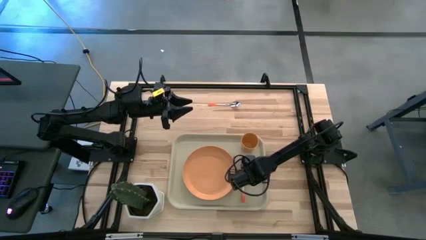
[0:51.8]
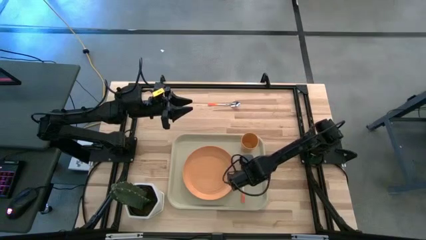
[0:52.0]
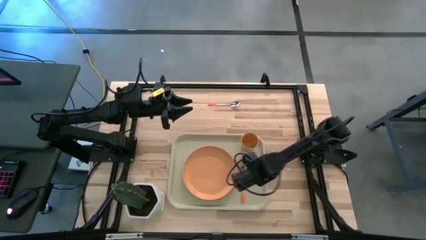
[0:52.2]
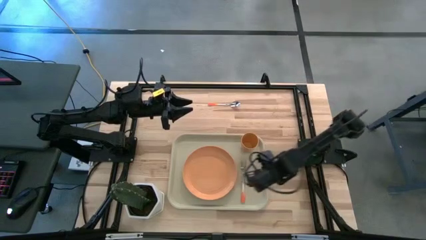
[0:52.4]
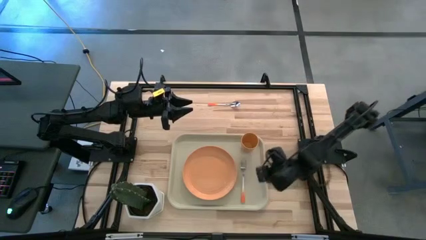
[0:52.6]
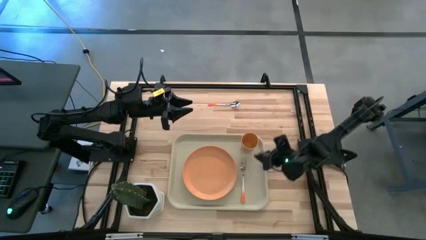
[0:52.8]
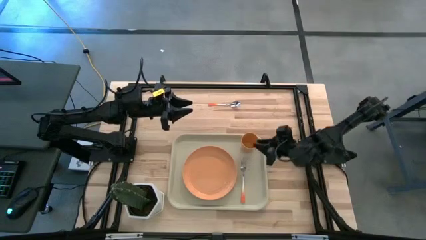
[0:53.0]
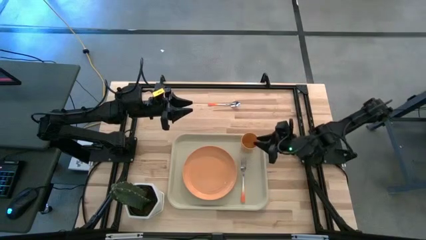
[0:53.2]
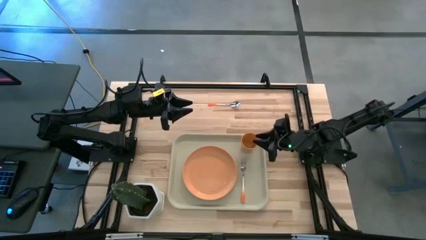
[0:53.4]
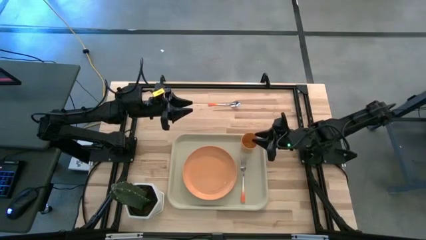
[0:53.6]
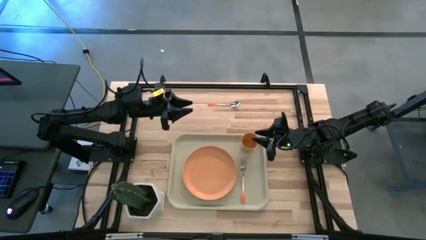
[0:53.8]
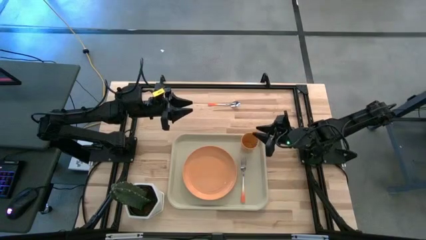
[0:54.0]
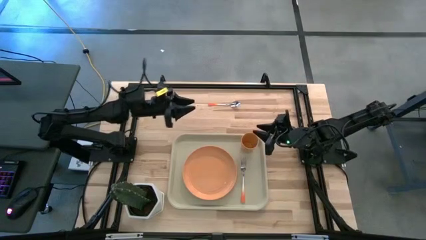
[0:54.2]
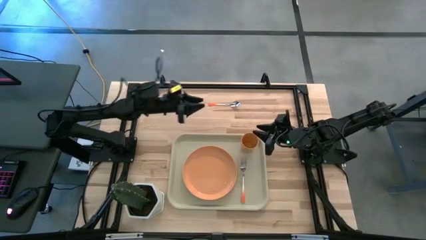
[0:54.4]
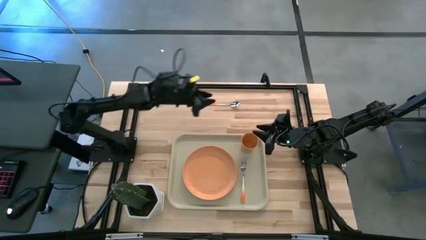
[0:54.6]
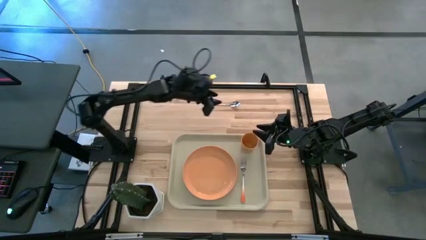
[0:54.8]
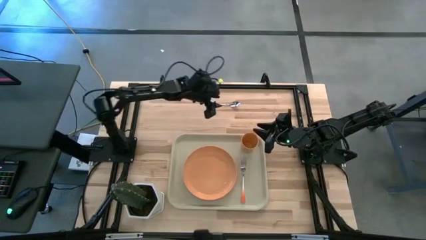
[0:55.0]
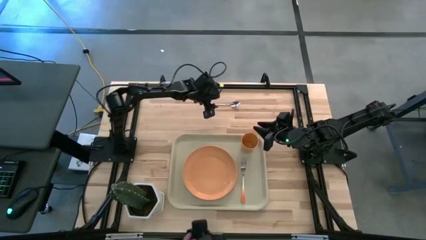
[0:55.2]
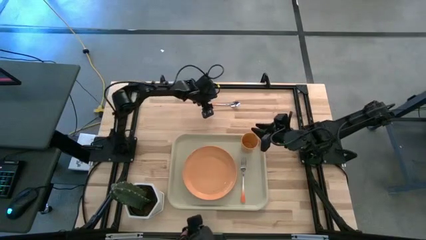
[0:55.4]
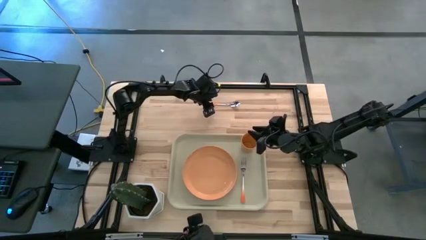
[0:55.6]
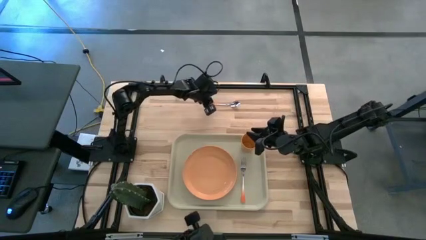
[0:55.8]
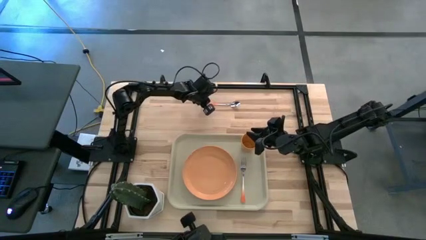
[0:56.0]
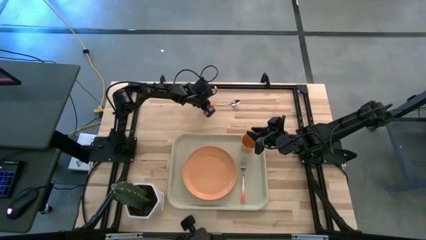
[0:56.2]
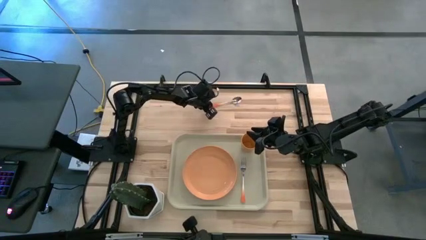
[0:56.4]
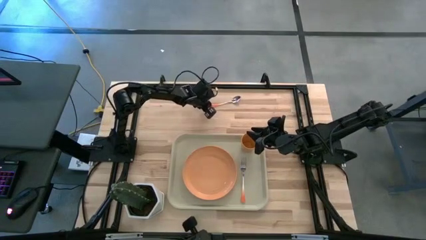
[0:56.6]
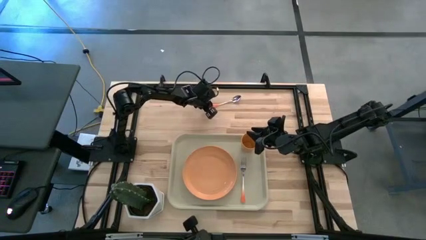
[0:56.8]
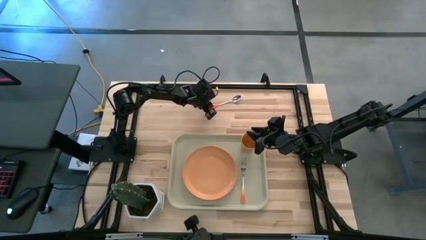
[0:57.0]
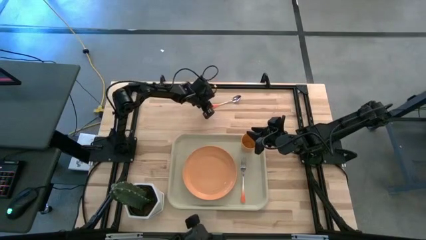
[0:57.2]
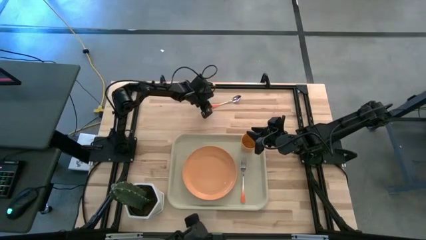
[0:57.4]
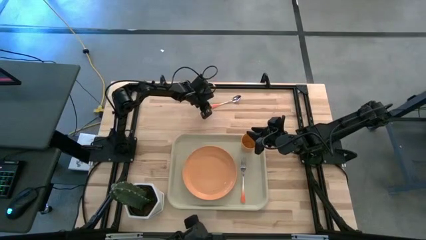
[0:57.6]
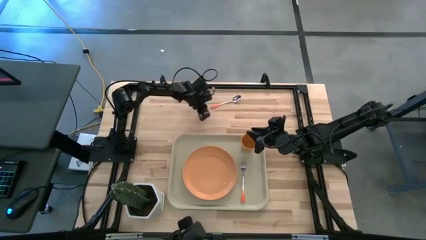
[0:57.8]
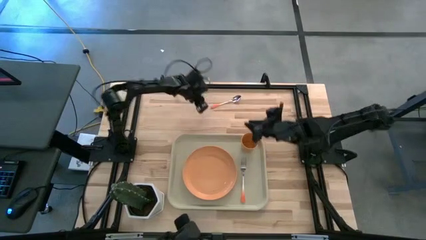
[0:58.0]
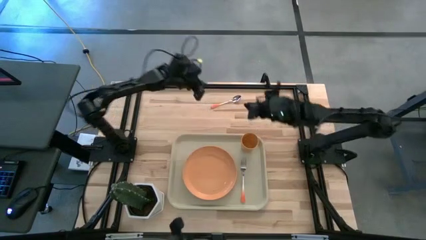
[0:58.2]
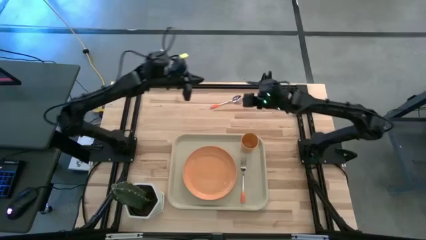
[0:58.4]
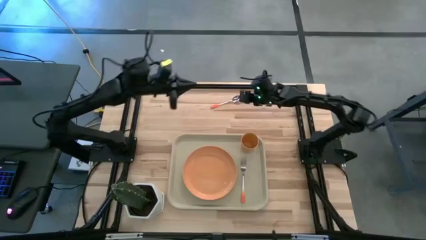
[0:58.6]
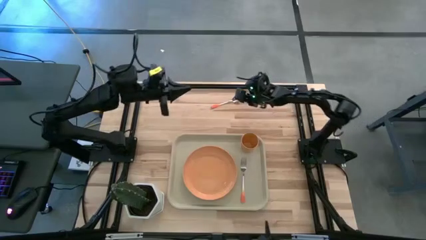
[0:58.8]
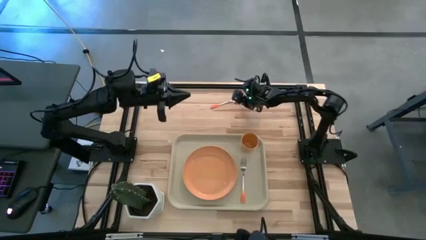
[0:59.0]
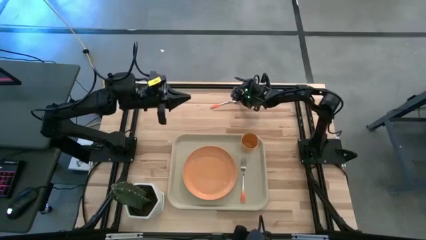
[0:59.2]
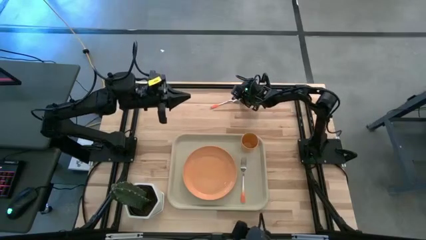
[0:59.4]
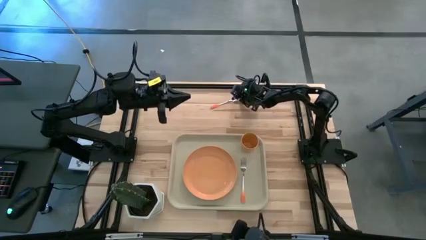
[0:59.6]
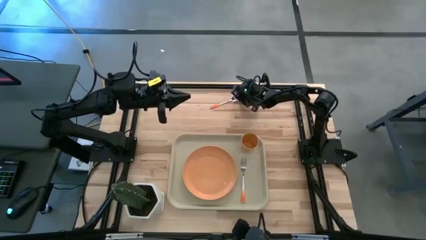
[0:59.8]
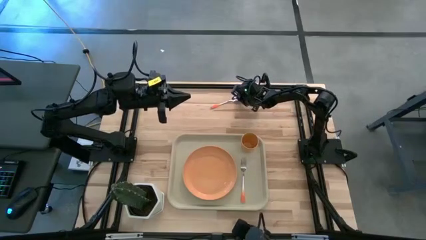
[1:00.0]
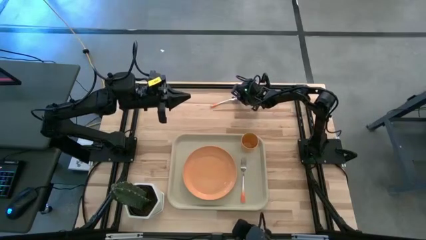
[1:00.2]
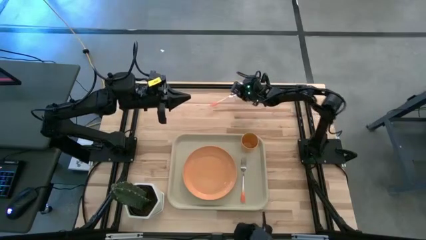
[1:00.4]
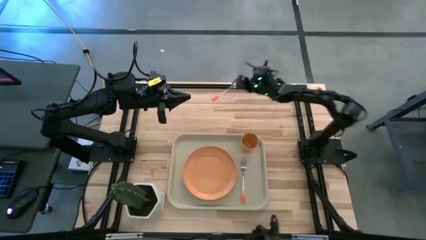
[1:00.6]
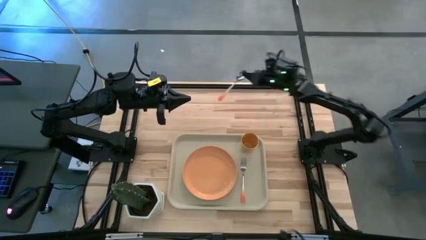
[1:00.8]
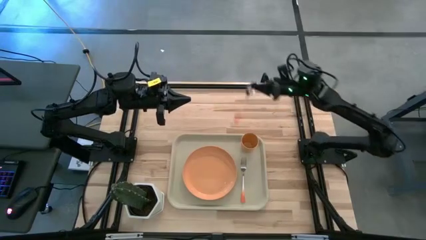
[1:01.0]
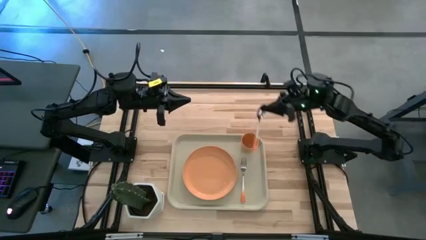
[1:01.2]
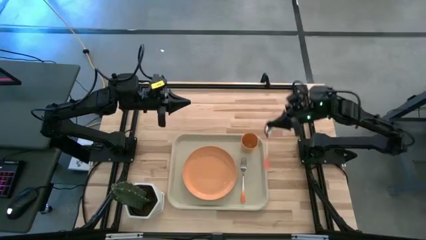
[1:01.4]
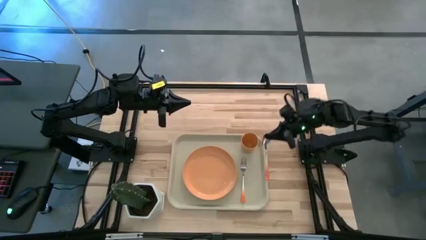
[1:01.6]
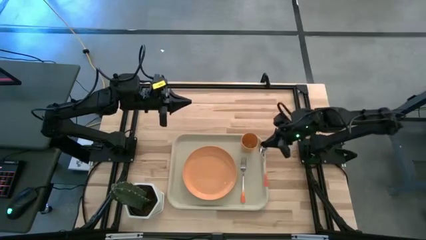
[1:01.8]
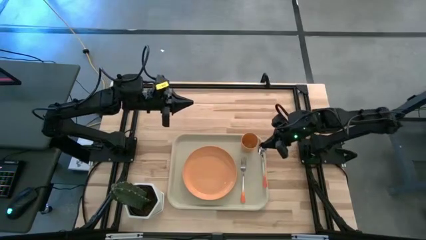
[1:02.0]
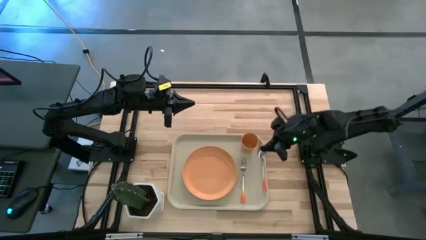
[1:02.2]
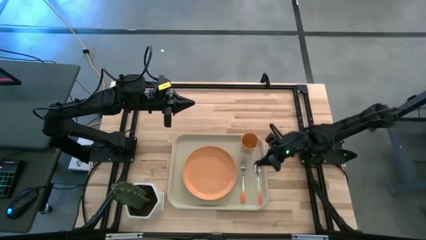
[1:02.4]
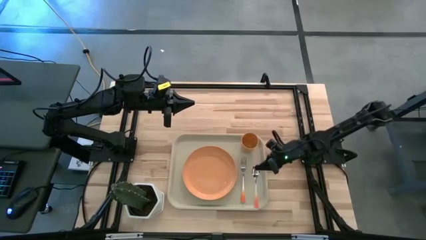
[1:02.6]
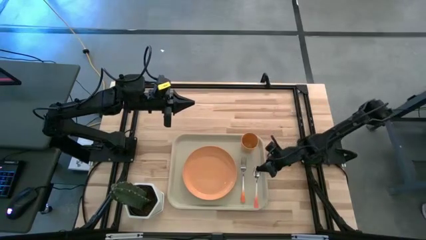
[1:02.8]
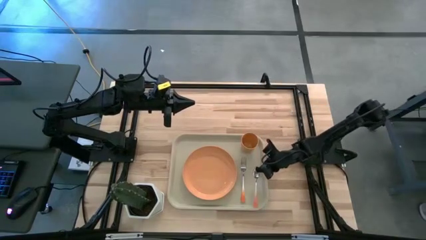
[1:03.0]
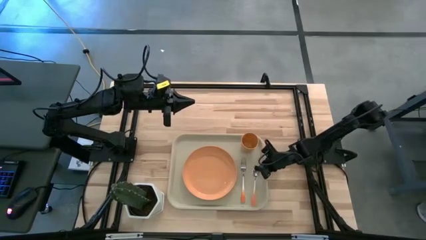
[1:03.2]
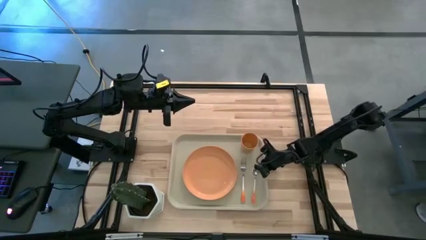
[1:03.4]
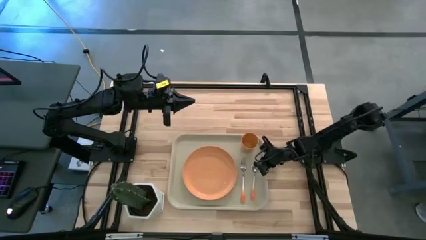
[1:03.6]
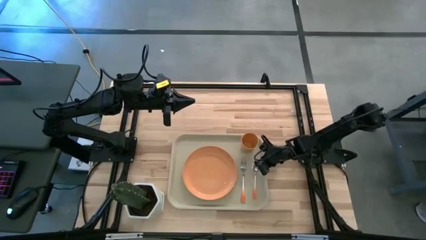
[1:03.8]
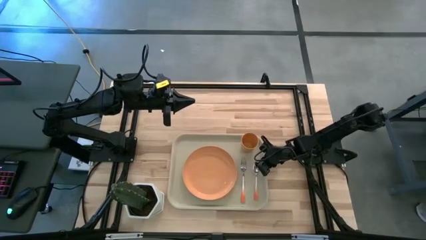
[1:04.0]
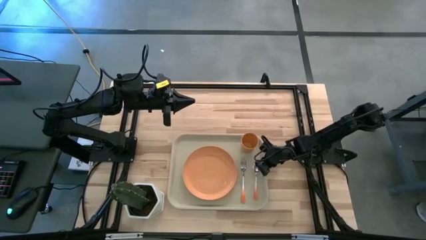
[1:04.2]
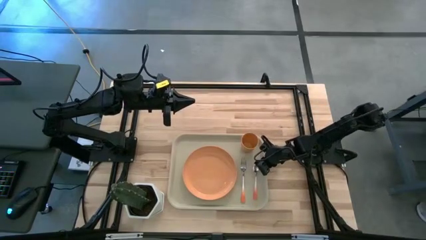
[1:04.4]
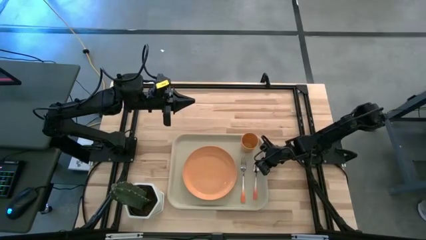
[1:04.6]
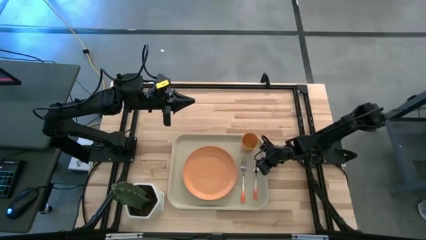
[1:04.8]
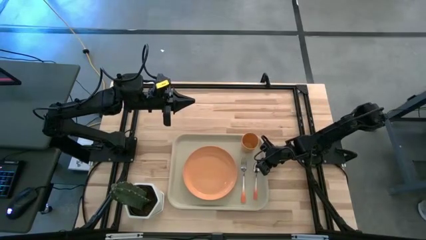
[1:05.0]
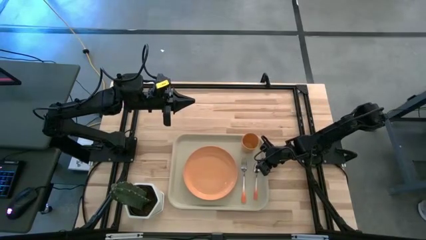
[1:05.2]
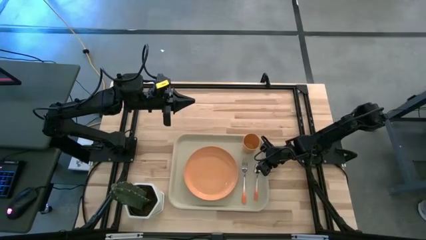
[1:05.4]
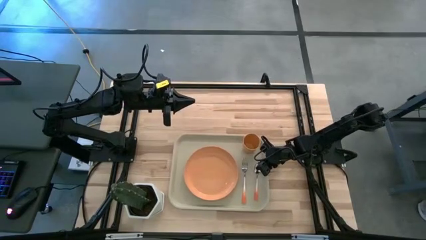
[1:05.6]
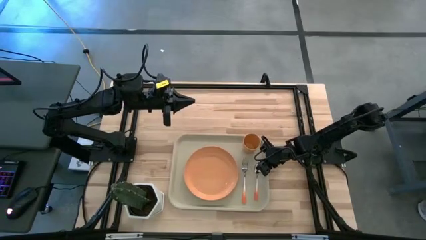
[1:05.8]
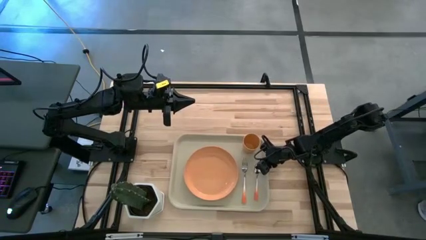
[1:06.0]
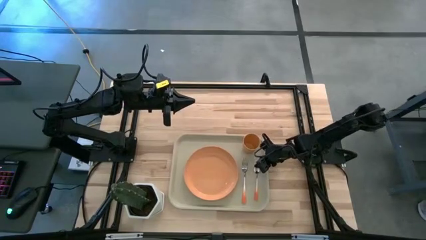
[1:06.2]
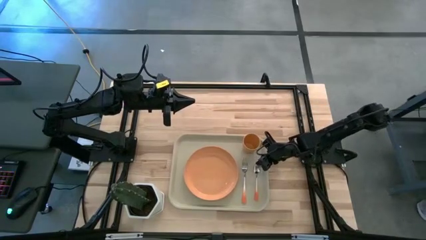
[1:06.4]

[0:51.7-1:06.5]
Task: Pick and place plate/cup/fork/spoon on tray
Put the orange spoon to the right of the orange fork on the gray tray
